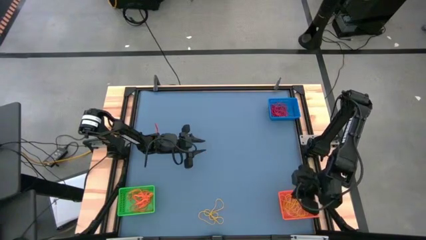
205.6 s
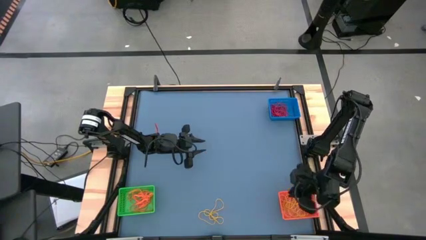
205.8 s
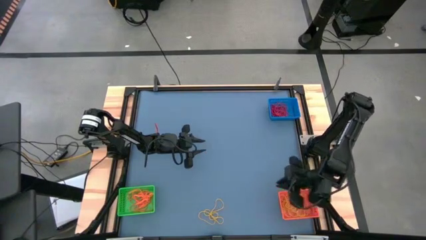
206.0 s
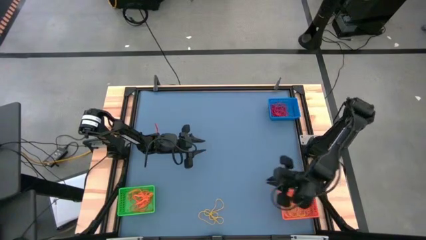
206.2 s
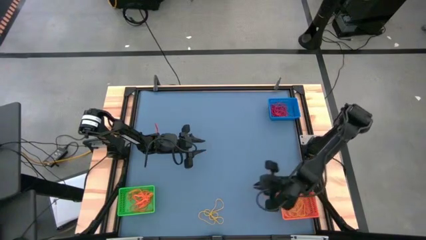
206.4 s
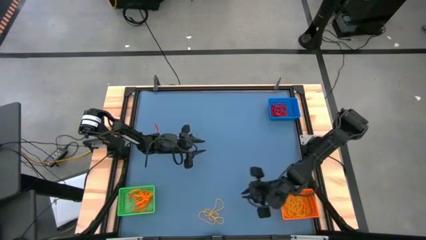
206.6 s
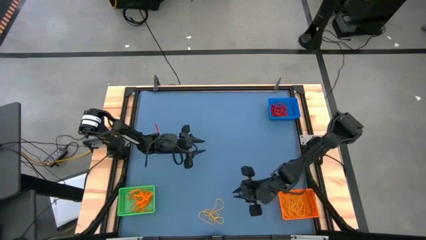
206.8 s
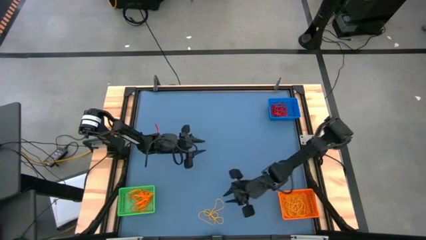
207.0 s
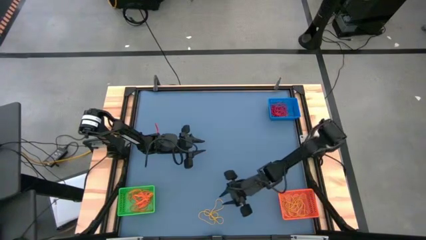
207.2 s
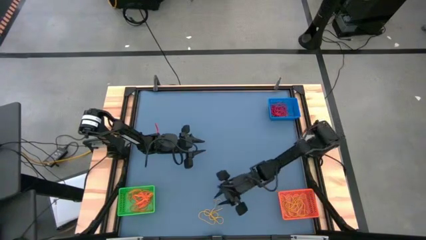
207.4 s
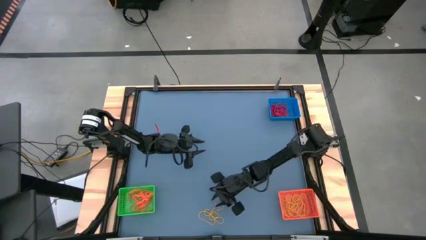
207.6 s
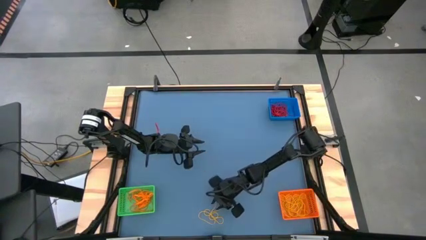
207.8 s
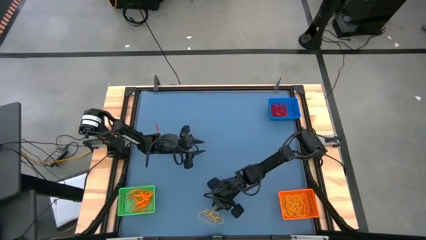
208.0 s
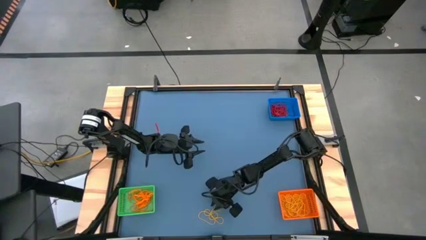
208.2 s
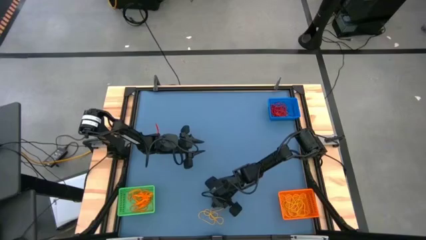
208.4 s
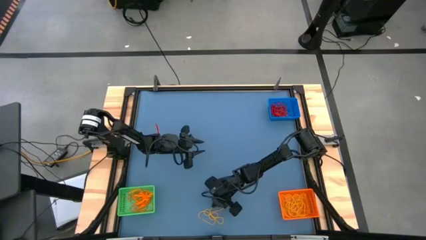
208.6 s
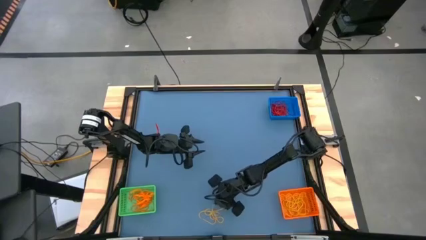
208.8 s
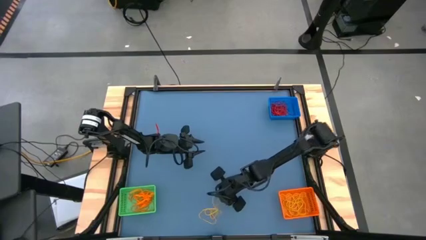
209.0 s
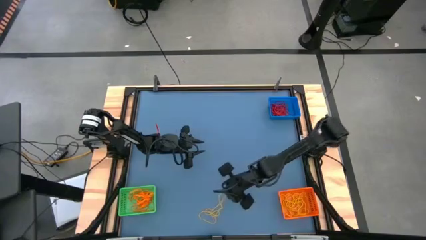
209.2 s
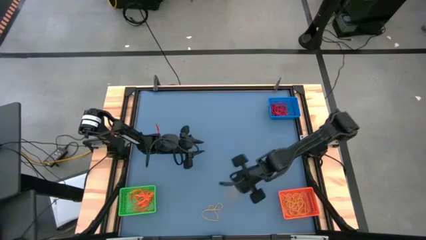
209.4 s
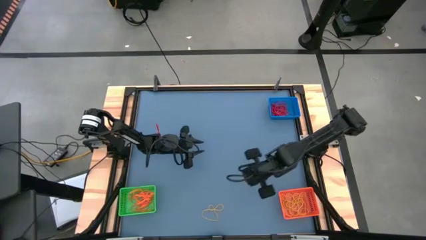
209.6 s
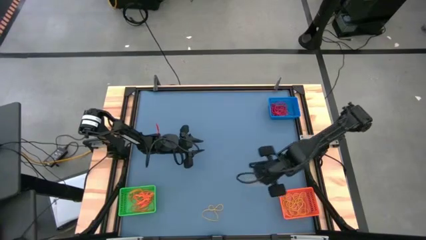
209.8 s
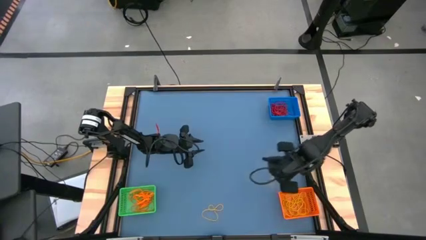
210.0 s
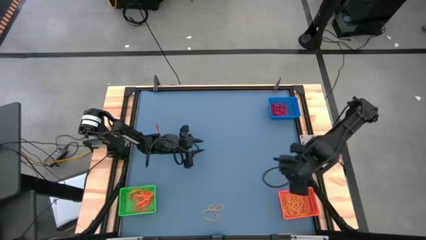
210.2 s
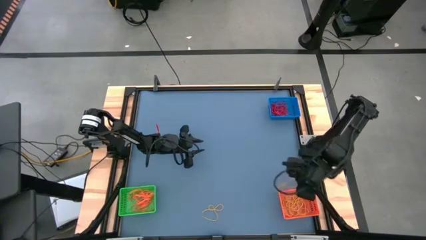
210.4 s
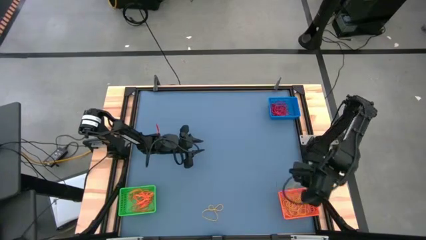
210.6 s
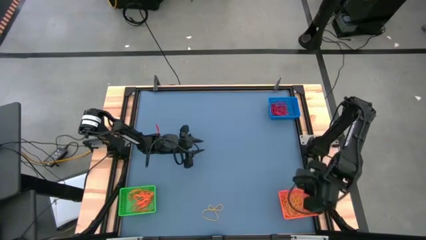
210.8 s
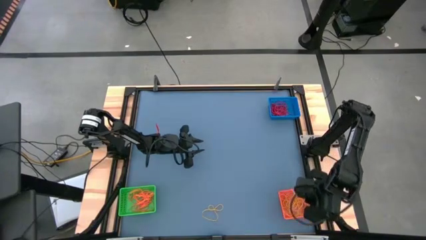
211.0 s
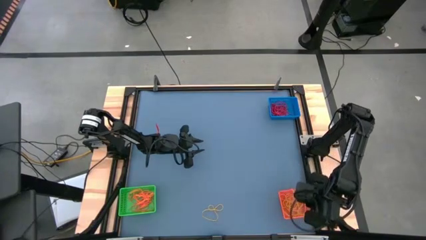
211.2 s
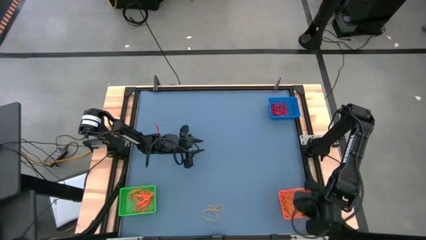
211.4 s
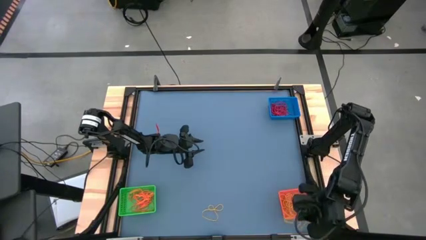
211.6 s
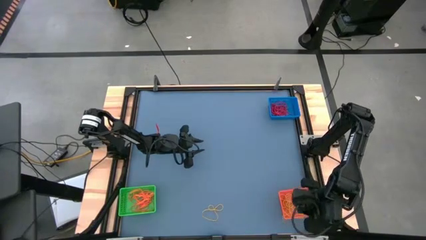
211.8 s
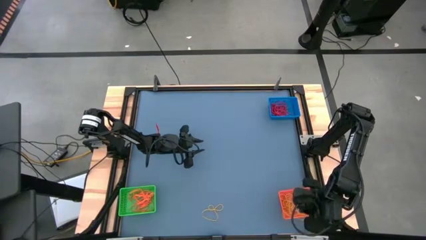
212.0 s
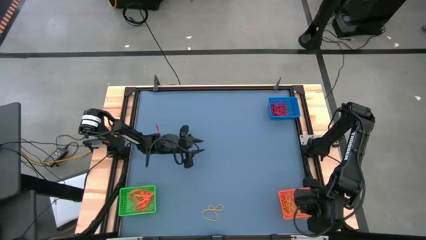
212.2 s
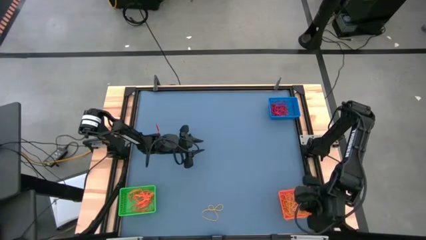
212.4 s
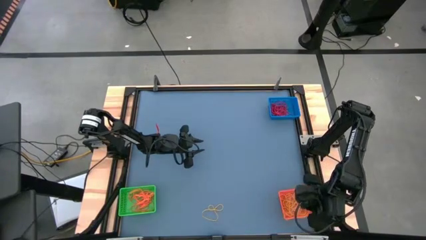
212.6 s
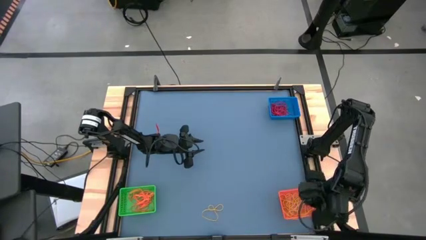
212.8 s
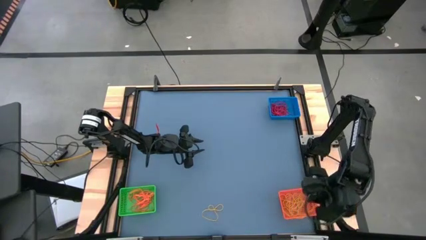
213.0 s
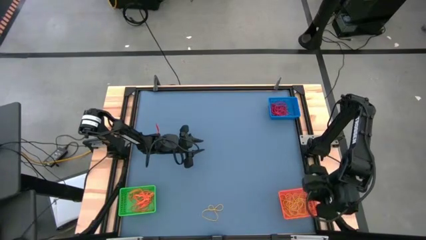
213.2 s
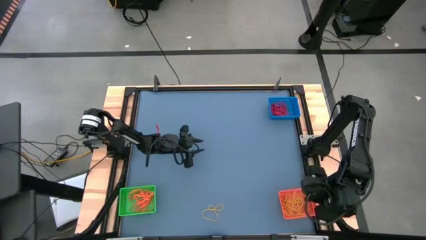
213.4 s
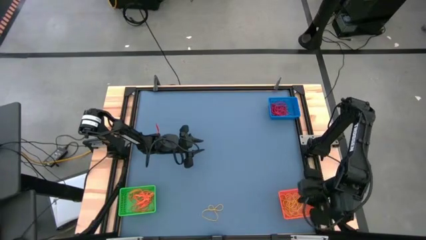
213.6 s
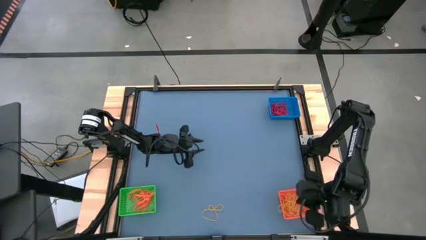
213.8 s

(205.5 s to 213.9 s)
Task: Sort rubber bands into baskets
Put the yellow rubber band into the orange bin

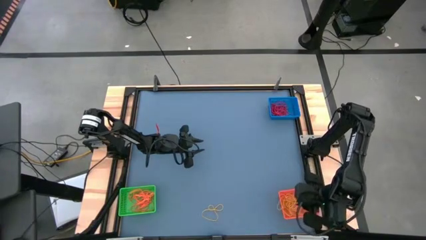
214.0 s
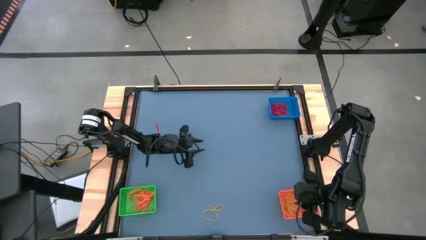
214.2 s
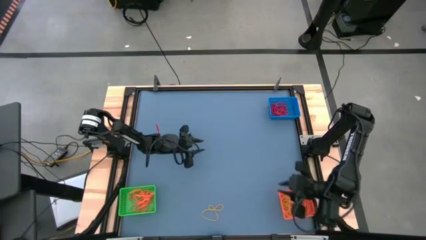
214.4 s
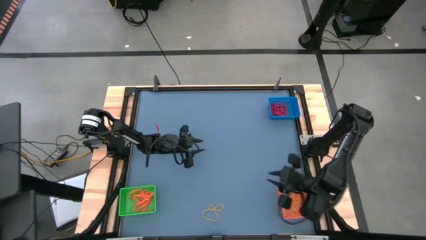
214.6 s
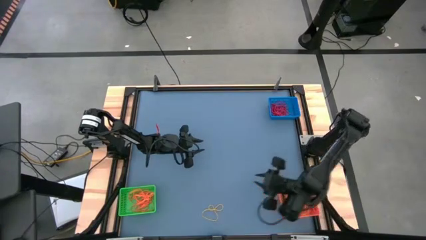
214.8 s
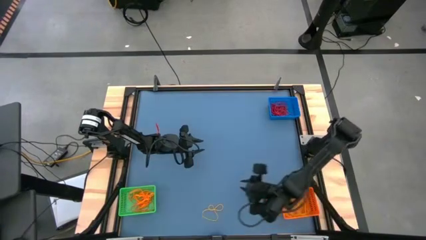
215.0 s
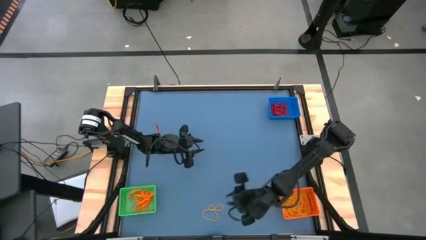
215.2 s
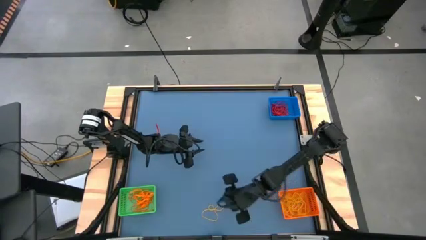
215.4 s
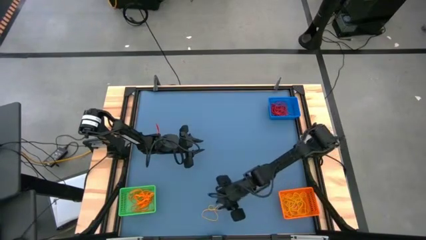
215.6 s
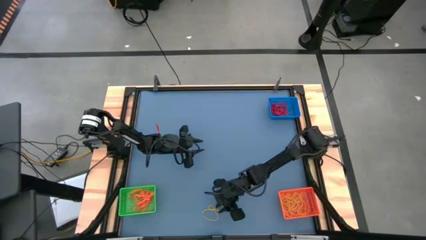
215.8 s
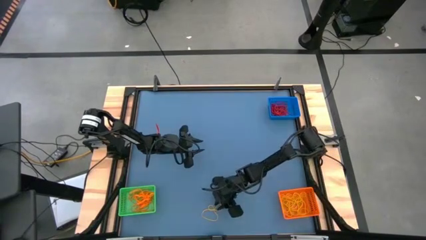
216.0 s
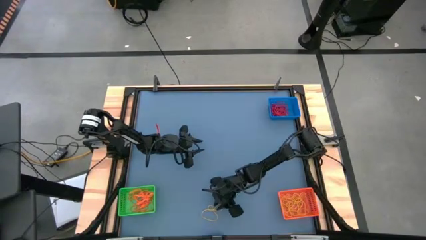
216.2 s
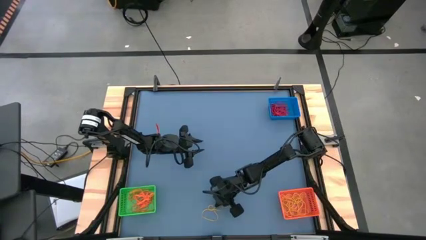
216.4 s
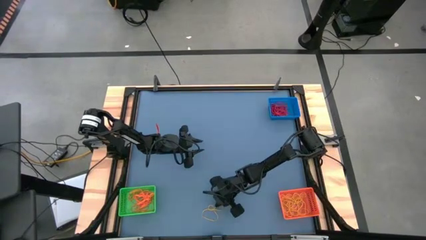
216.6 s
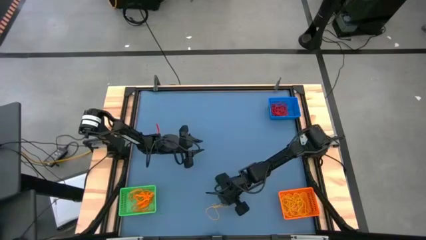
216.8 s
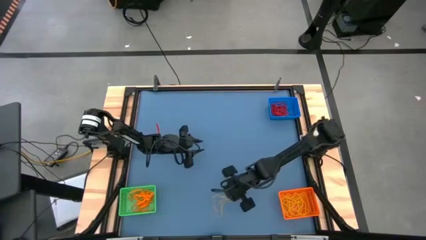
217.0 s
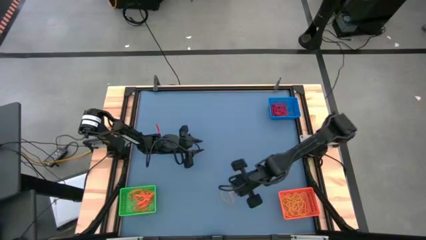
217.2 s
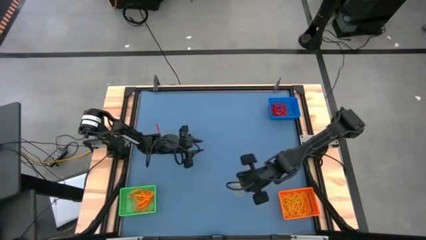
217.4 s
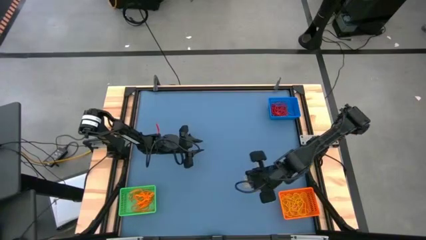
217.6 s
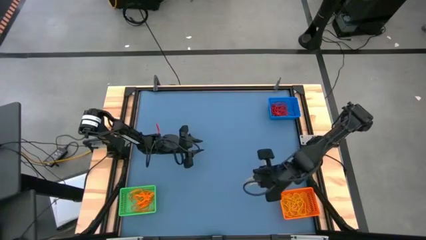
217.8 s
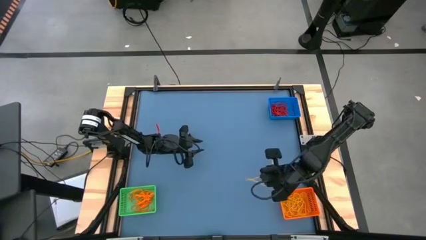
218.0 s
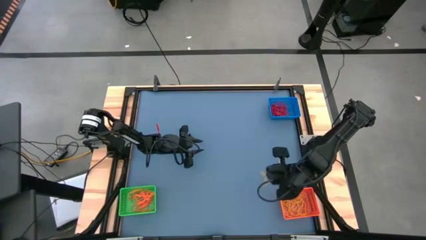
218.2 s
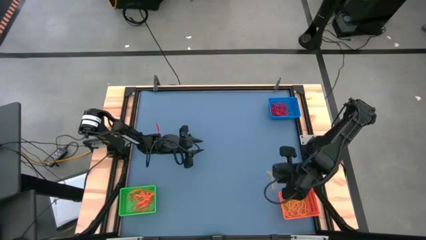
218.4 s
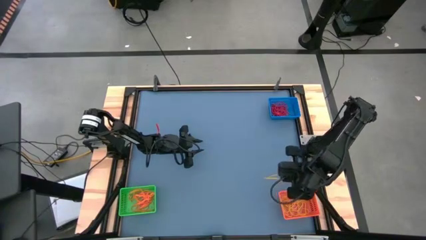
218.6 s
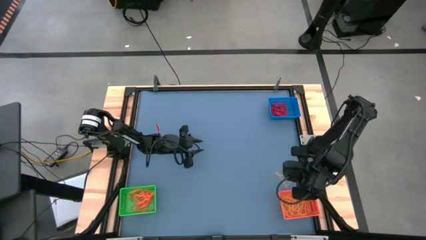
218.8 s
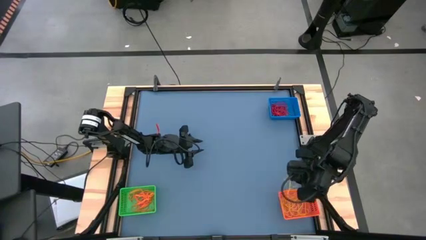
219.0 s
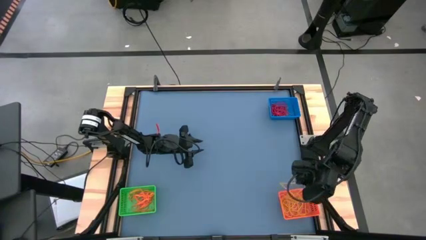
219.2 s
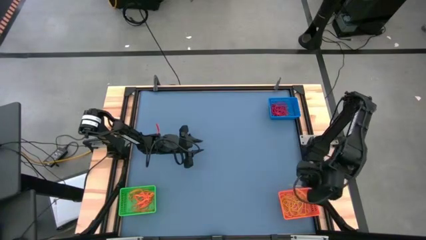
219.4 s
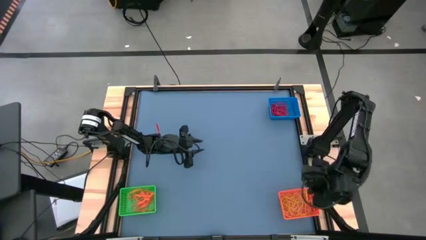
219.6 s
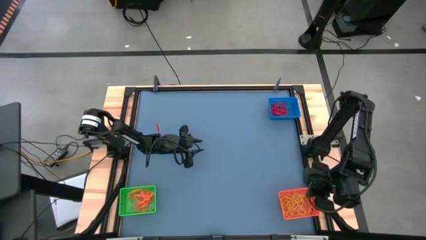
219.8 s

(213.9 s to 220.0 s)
Put the yellow rubber band into the orange bin
